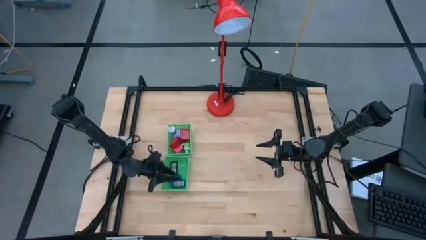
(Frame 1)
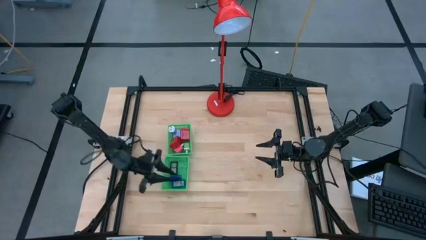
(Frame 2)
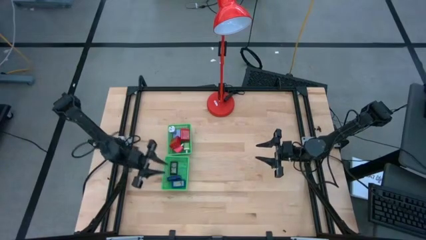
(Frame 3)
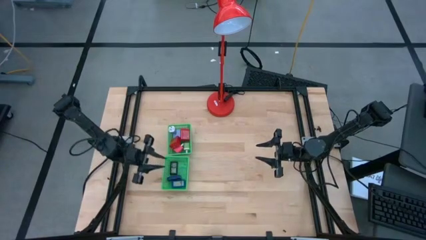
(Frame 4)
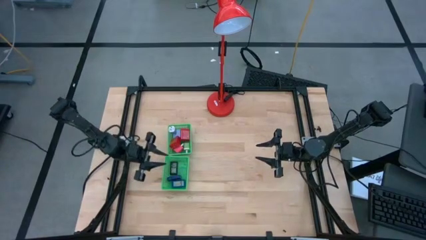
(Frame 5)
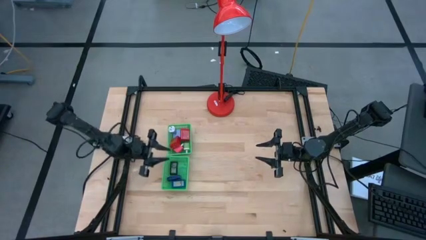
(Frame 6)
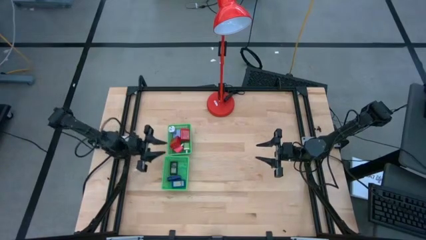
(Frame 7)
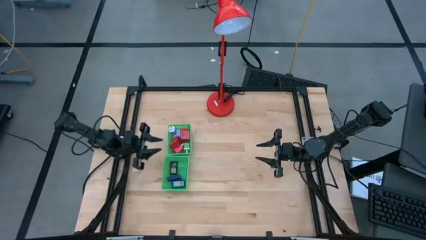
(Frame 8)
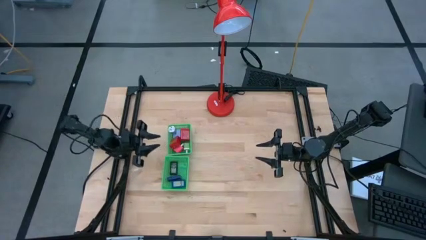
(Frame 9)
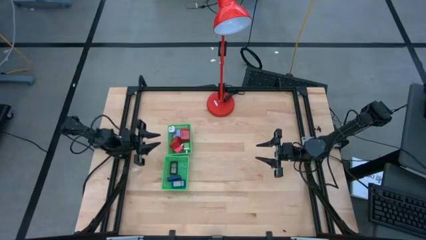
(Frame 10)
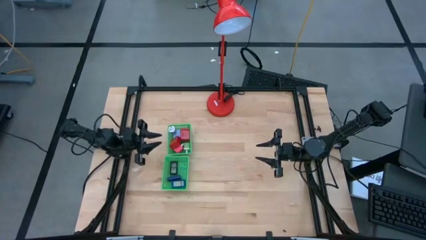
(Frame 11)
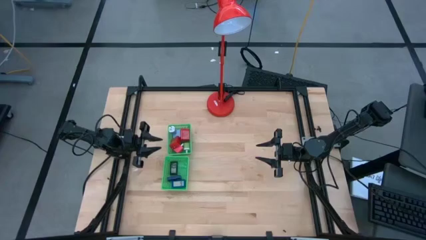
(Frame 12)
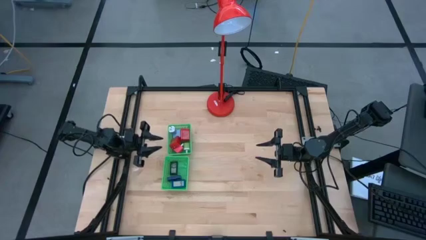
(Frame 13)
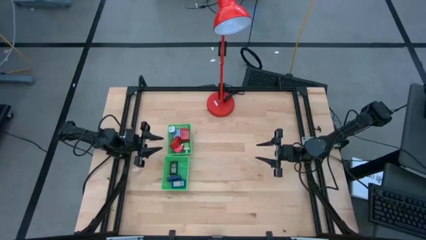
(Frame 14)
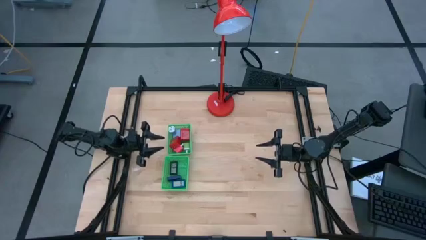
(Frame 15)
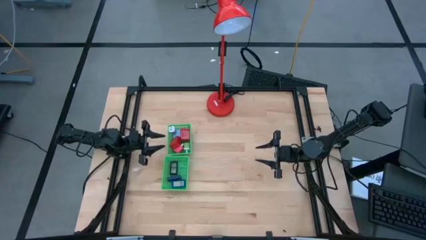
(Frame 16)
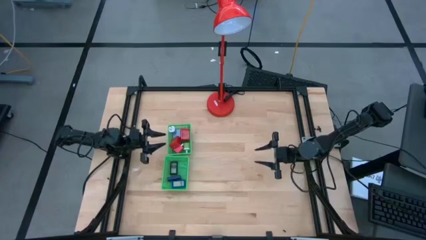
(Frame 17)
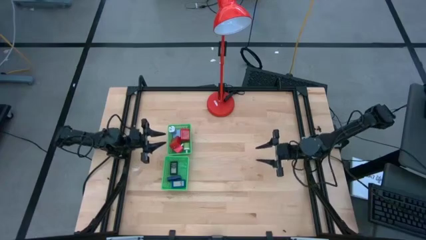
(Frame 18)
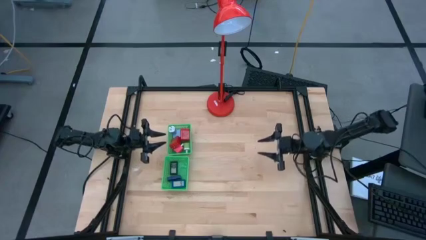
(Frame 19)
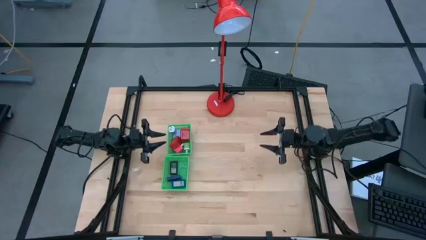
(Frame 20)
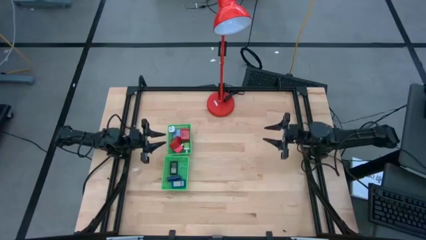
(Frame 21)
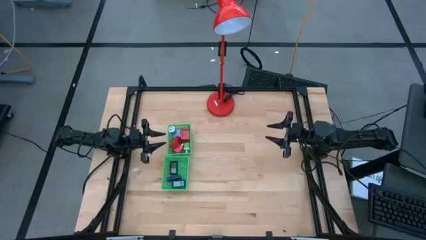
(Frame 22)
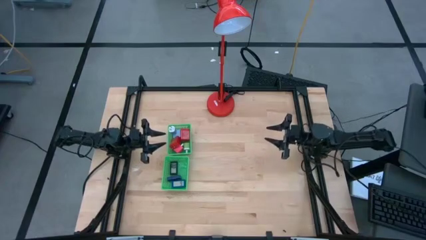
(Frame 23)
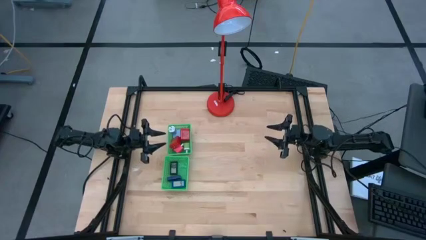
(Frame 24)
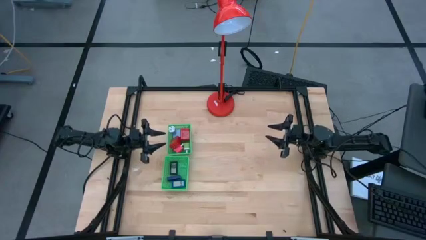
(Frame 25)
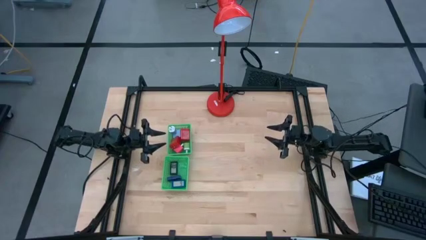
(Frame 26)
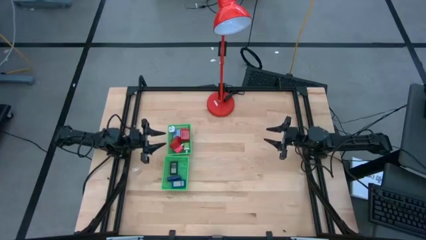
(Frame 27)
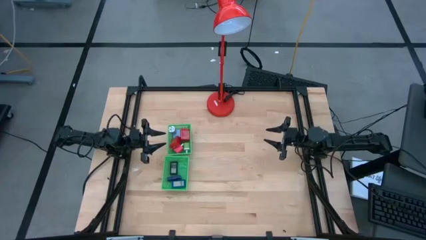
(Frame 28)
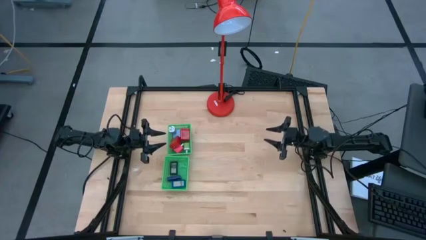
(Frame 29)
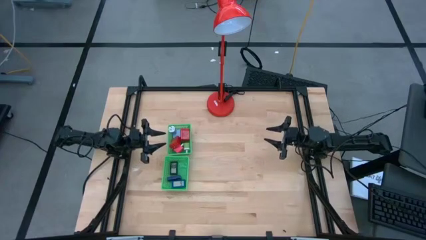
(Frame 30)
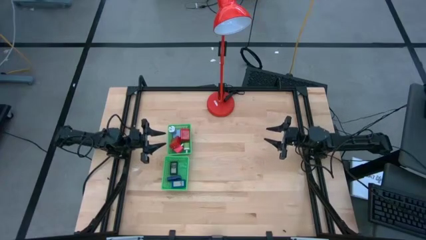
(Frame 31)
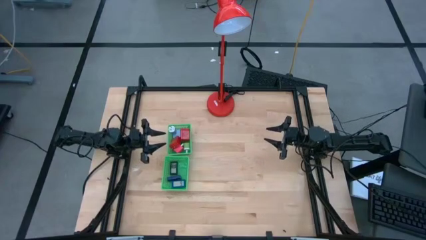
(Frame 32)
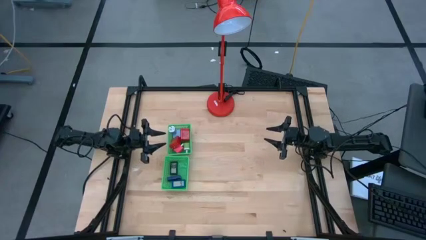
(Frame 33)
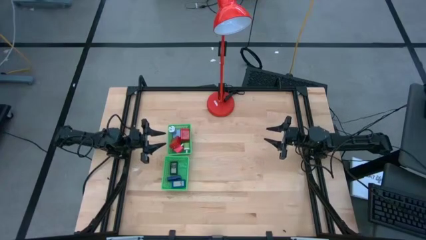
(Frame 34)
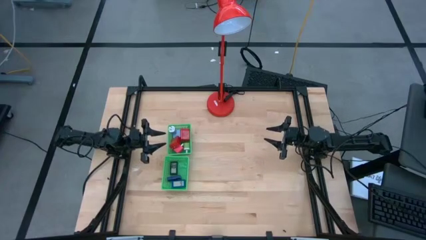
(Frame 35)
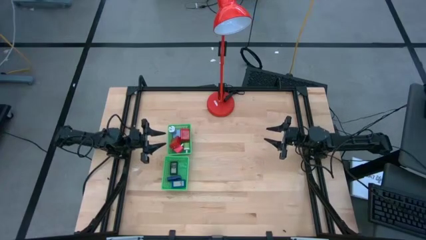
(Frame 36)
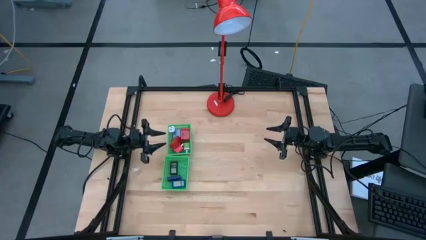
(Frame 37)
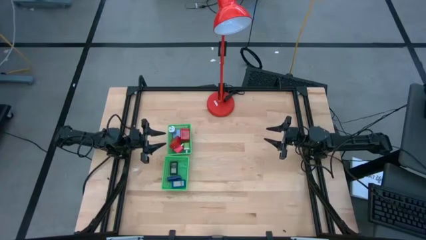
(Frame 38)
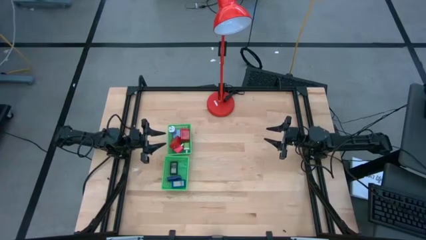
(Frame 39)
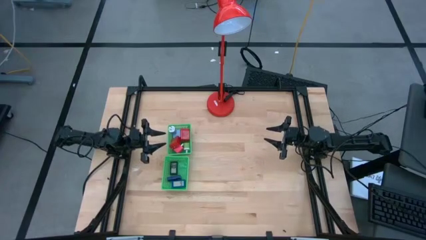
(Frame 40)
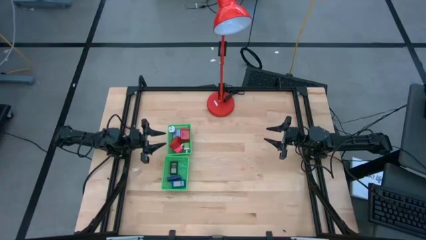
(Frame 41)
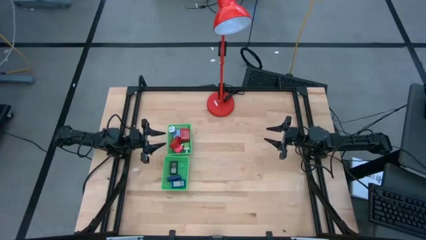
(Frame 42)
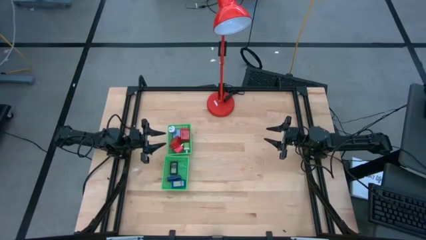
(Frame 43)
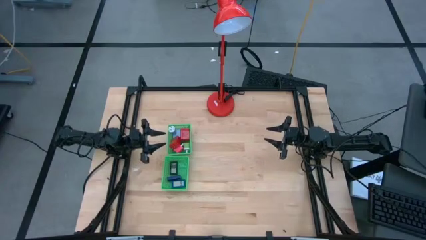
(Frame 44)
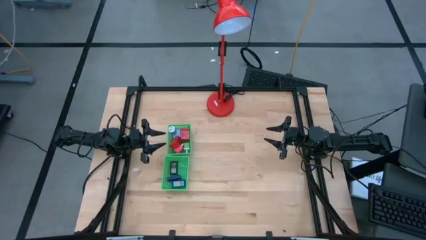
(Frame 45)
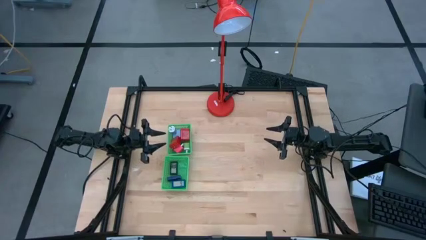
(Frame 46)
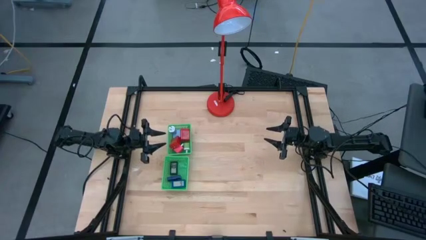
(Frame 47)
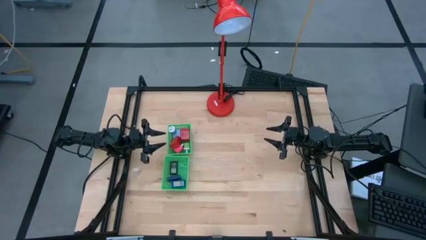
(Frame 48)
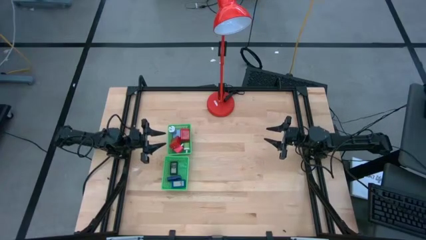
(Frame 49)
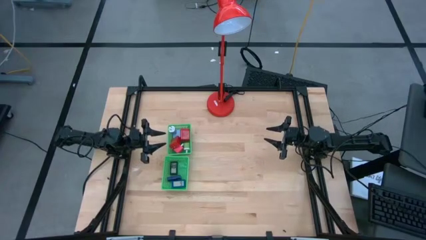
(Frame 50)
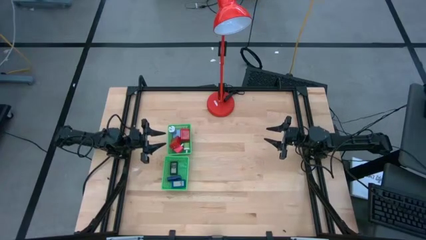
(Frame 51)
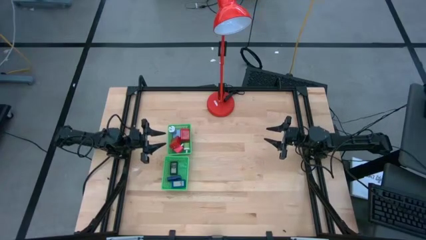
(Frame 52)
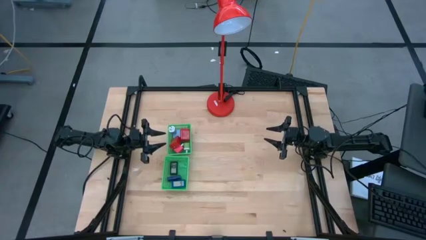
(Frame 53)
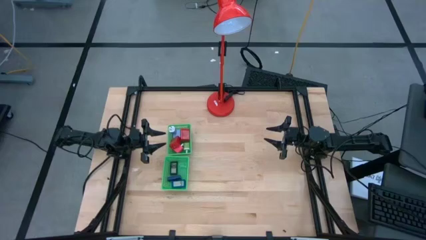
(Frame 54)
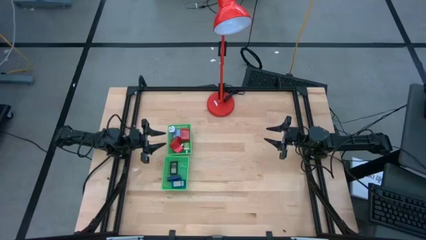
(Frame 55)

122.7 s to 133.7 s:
Task: Pick & Place Office items
Return to Home Position

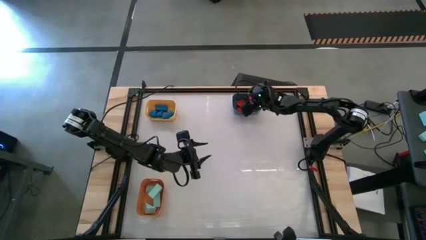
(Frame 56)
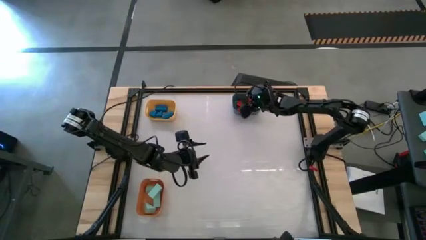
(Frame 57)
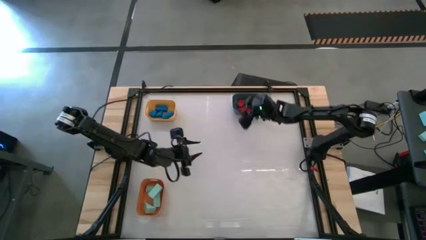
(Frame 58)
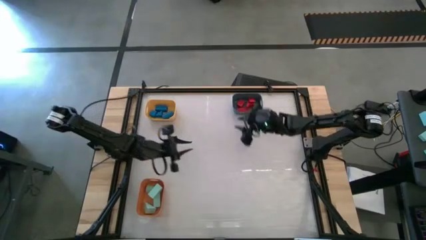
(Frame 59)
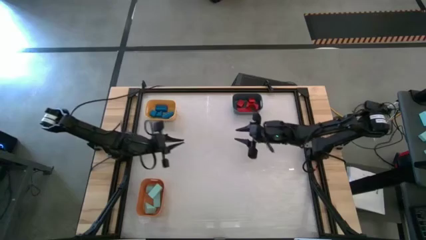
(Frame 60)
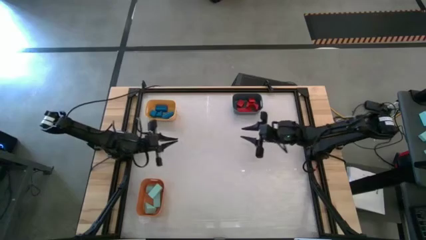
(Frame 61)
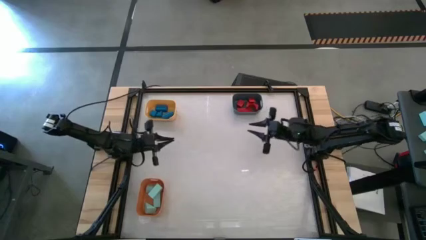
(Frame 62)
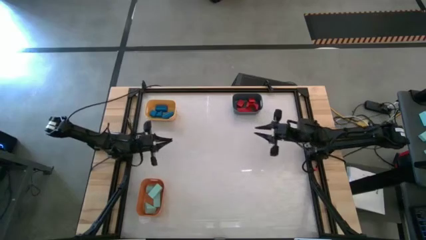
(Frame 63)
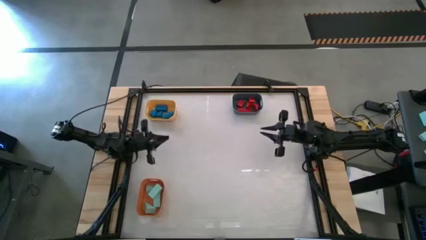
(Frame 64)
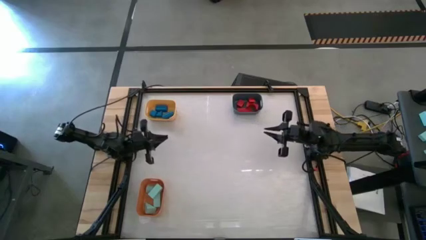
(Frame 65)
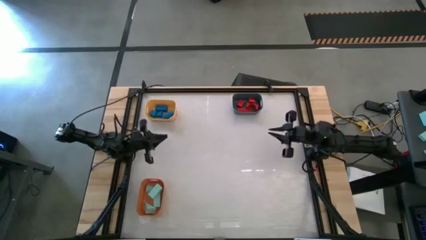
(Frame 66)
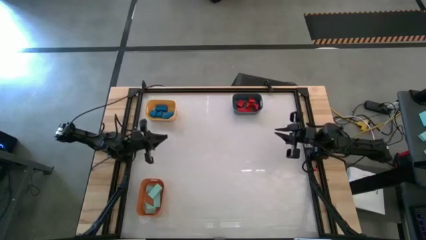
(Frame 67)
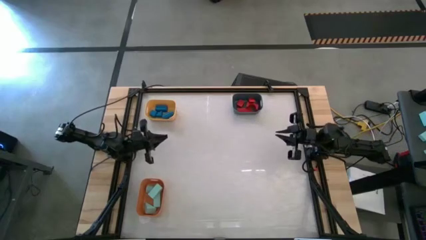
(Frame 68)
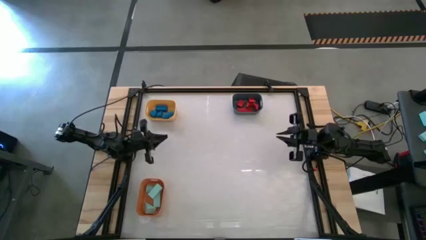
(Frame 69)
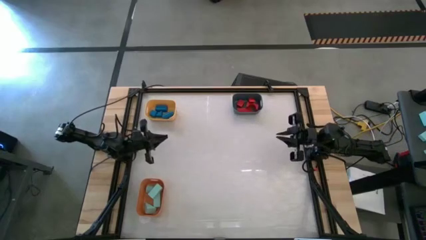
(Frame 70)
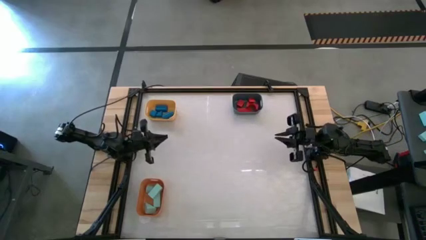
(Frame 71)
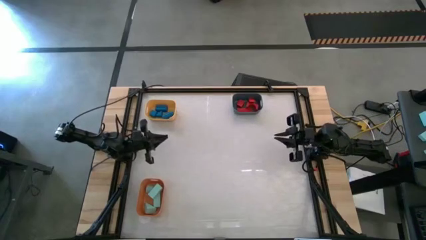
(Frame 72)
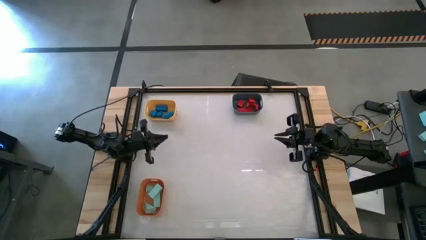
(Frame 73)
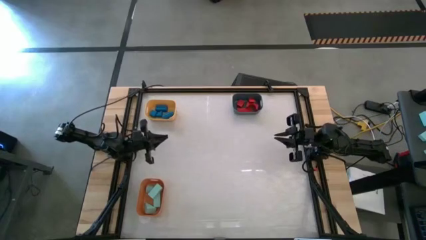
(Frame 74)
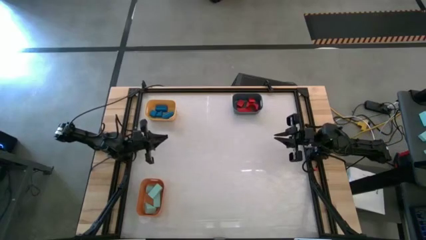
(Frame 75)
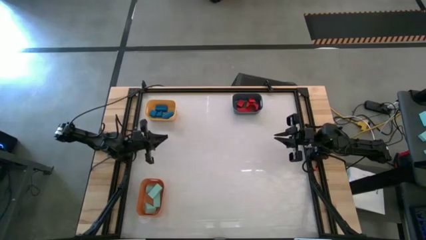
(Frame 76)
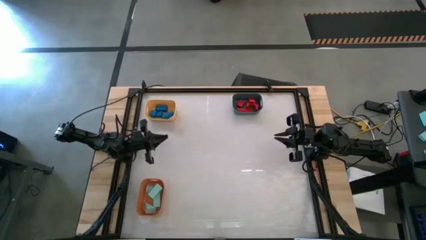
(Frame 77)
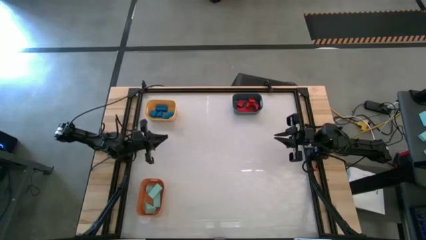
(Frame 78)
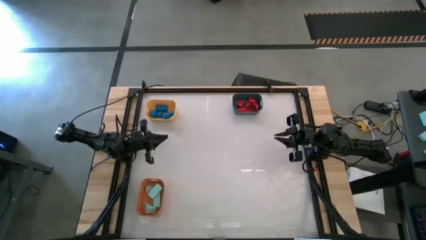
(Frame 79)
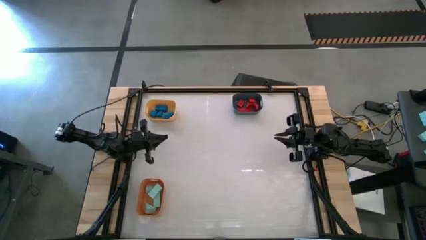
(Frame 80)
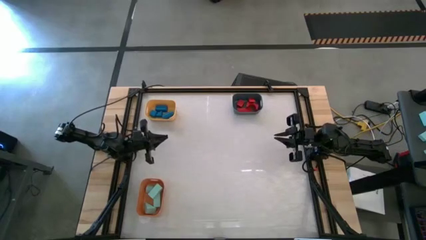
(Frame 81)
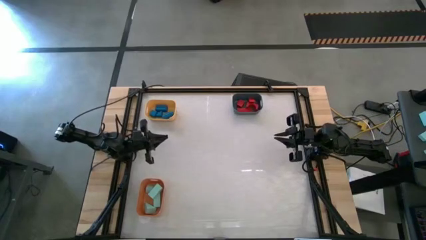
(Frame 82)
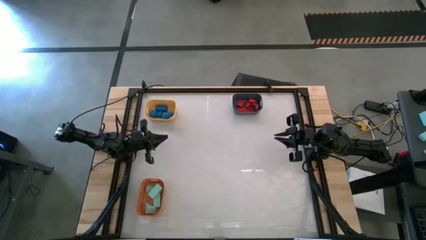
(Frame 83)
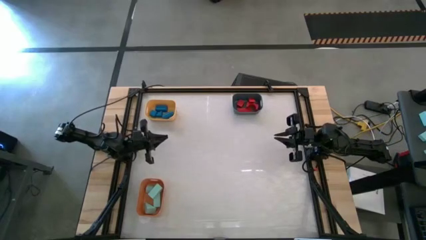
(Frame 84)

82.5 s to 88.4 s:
Task: Sort & place blocks by color
Return to Home Position
